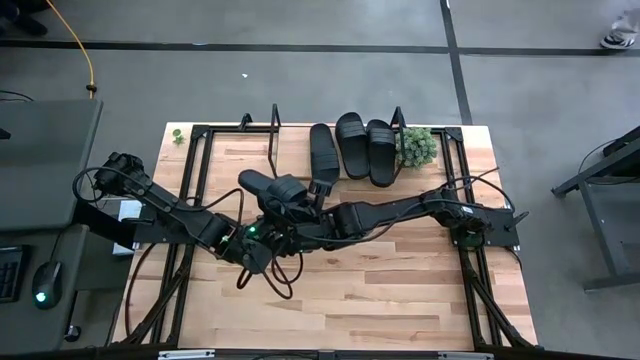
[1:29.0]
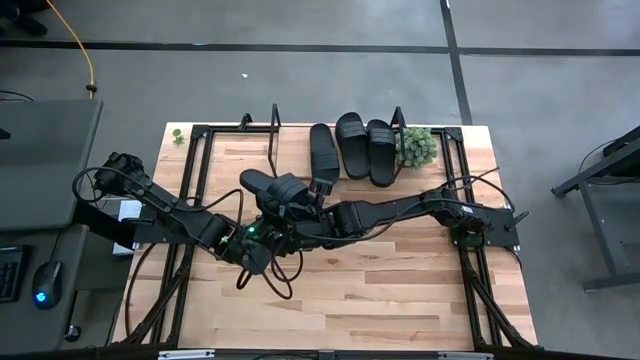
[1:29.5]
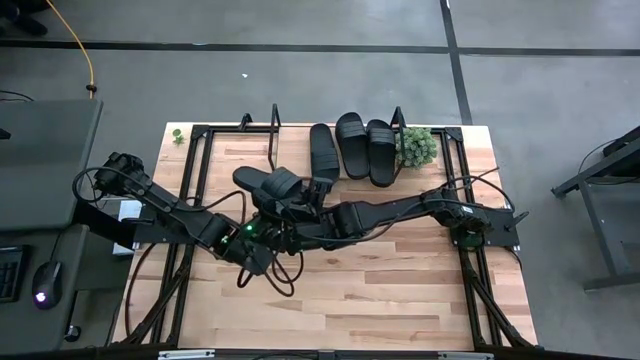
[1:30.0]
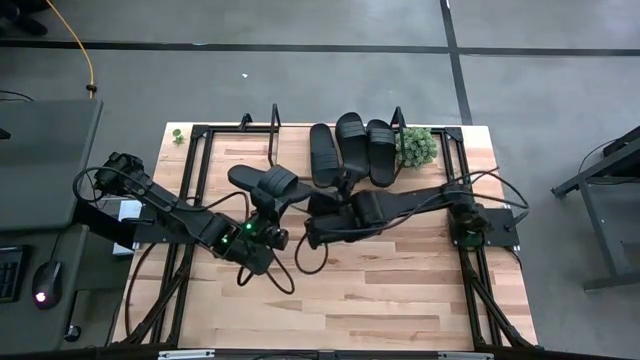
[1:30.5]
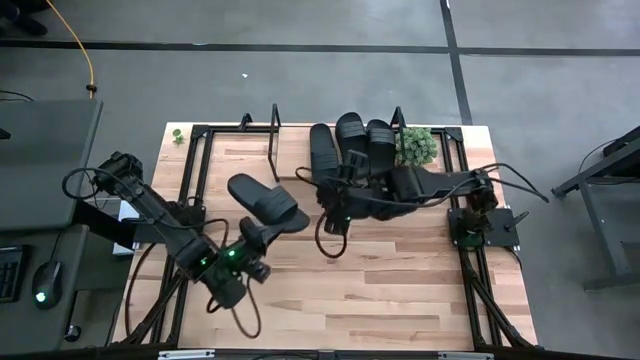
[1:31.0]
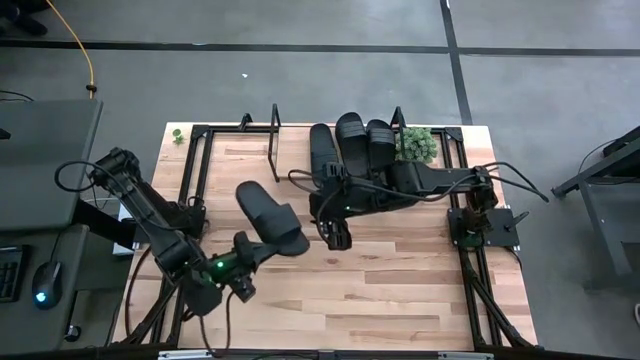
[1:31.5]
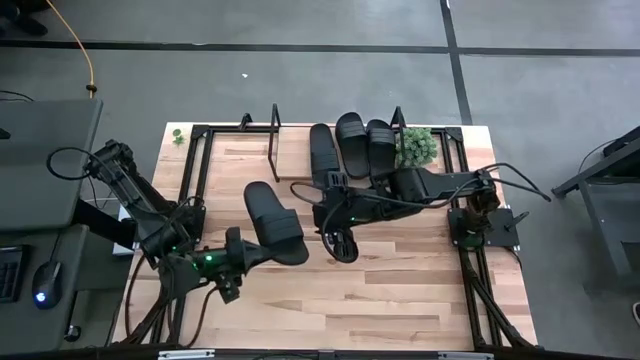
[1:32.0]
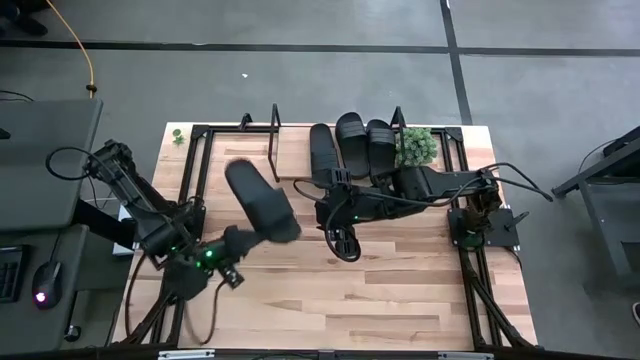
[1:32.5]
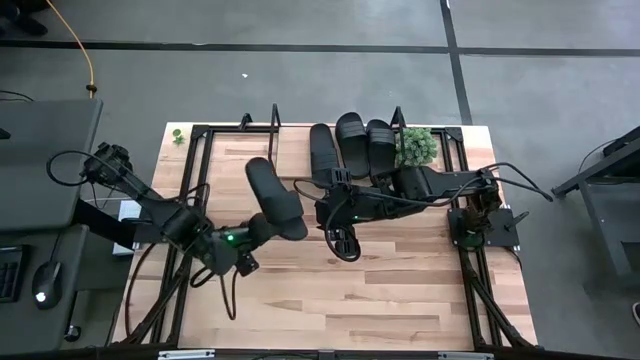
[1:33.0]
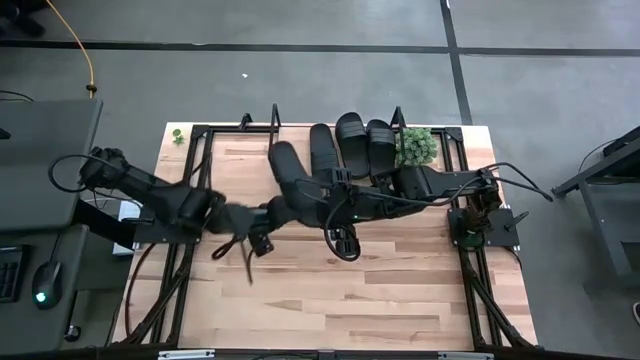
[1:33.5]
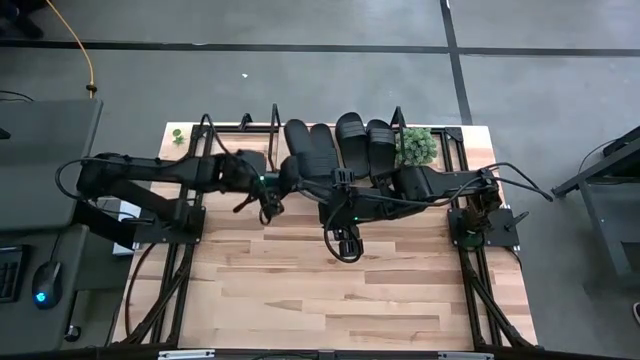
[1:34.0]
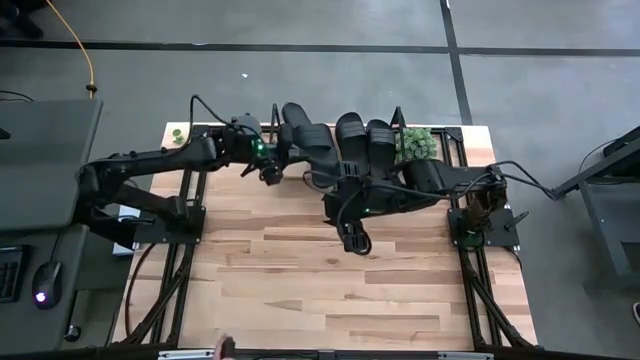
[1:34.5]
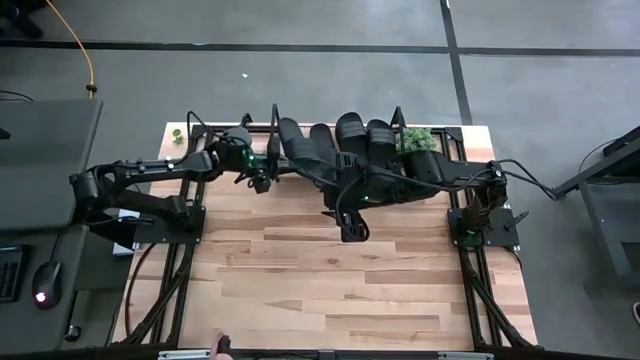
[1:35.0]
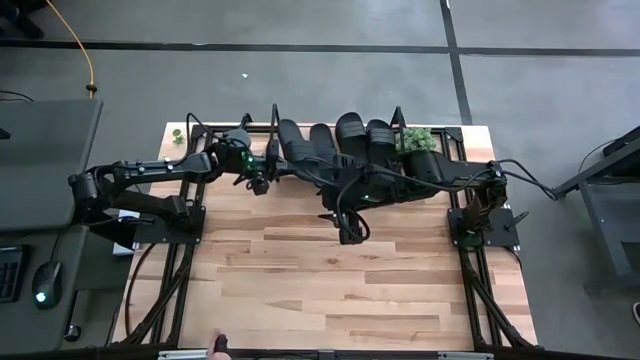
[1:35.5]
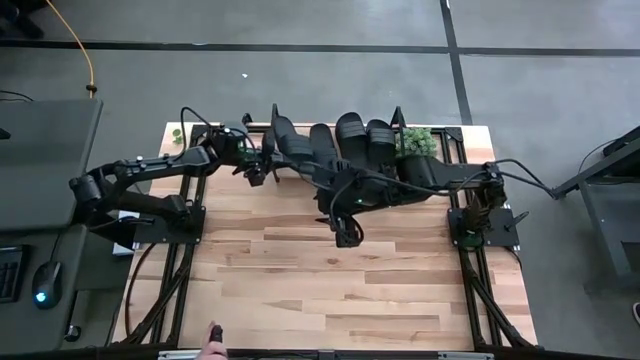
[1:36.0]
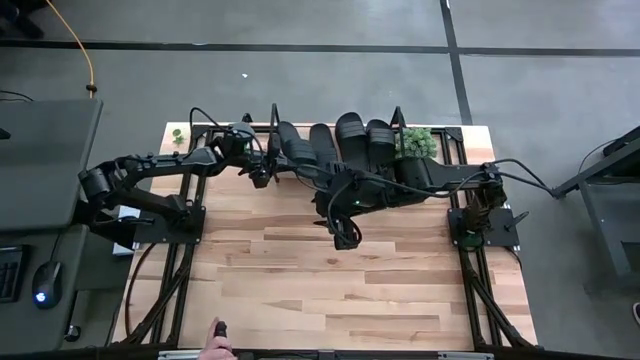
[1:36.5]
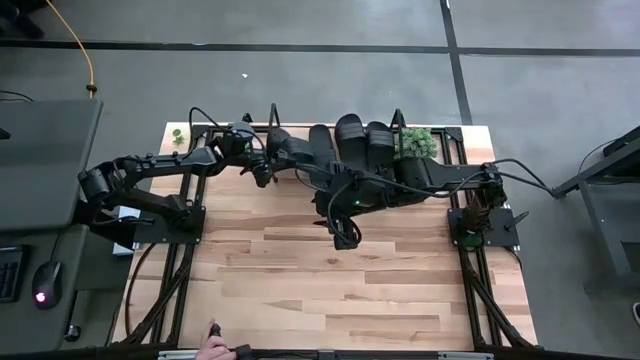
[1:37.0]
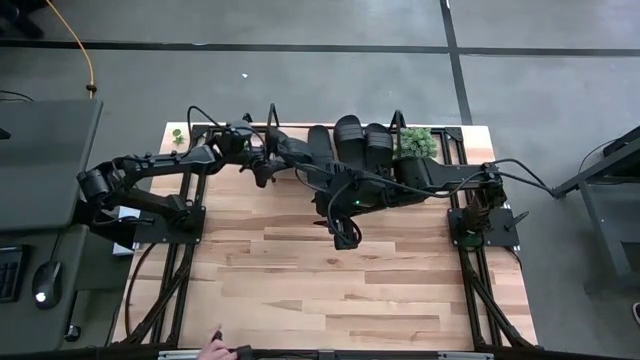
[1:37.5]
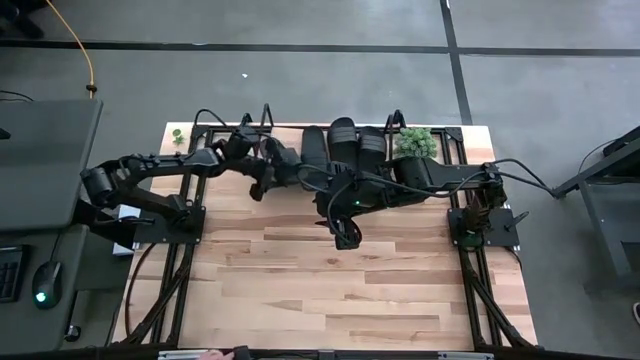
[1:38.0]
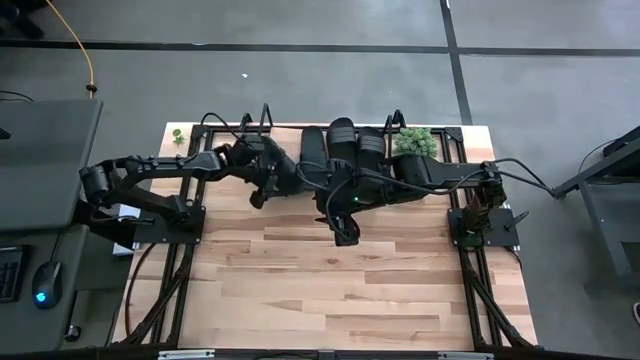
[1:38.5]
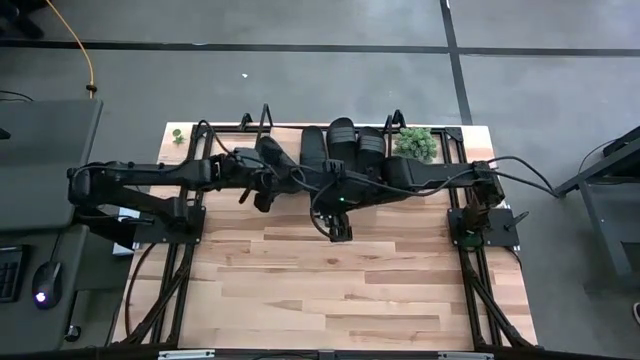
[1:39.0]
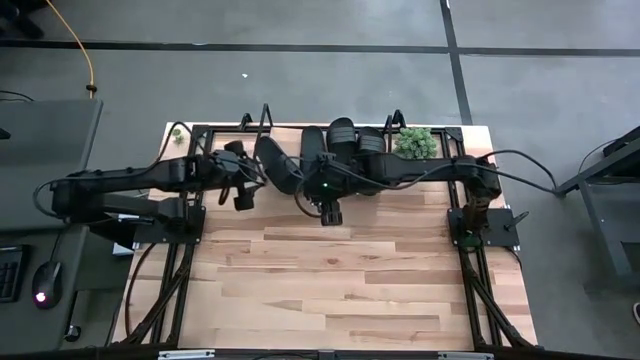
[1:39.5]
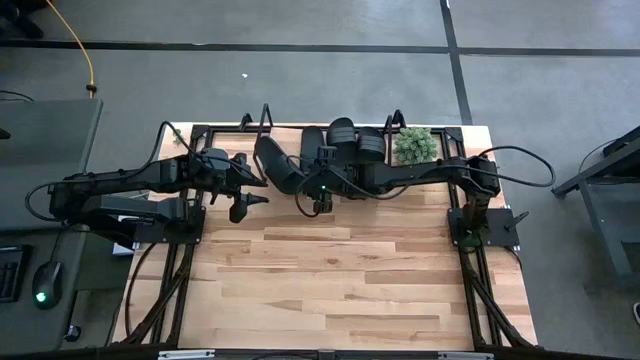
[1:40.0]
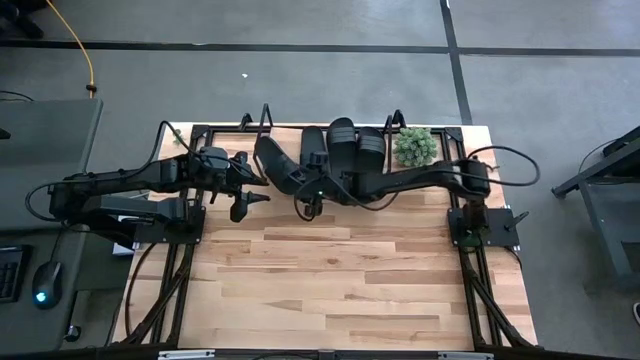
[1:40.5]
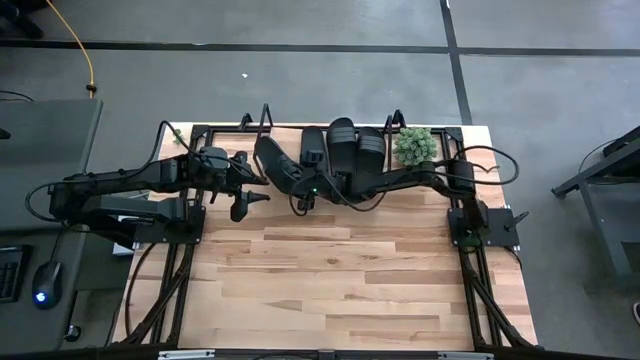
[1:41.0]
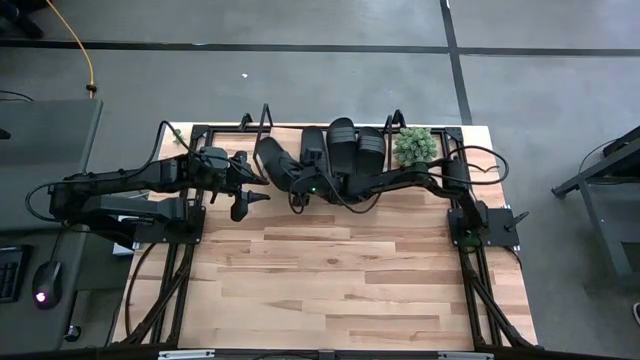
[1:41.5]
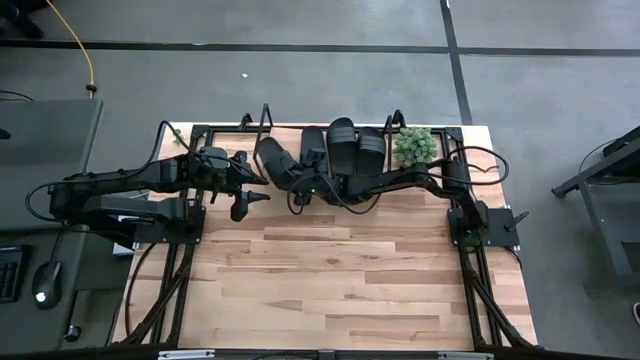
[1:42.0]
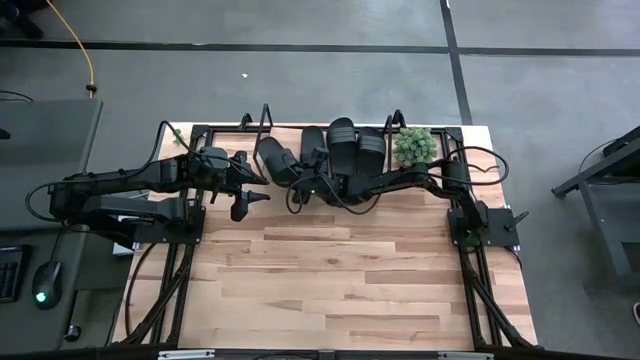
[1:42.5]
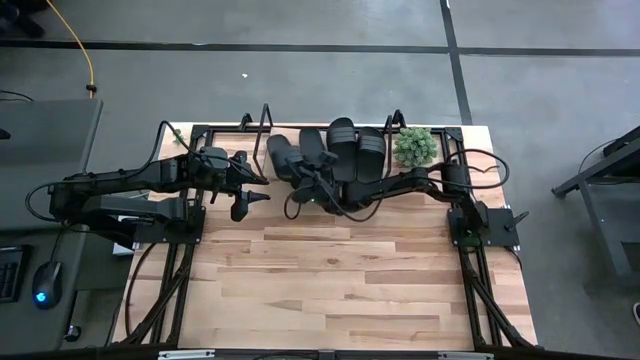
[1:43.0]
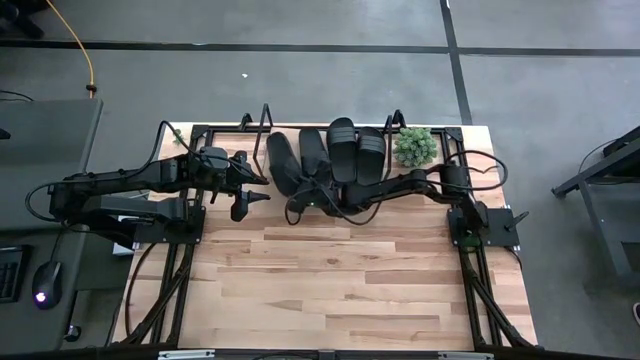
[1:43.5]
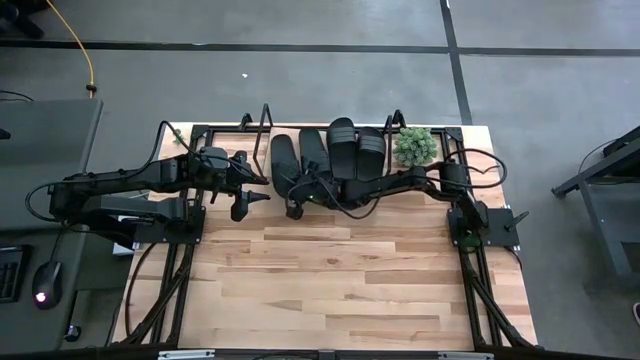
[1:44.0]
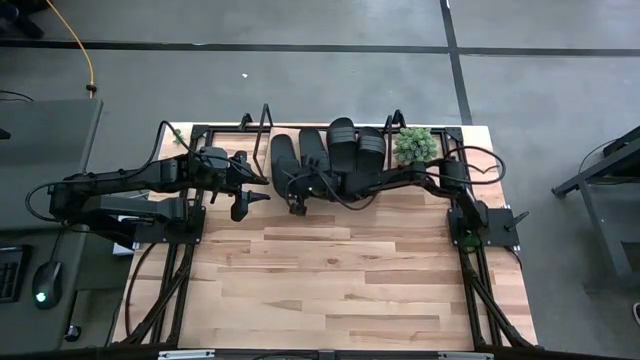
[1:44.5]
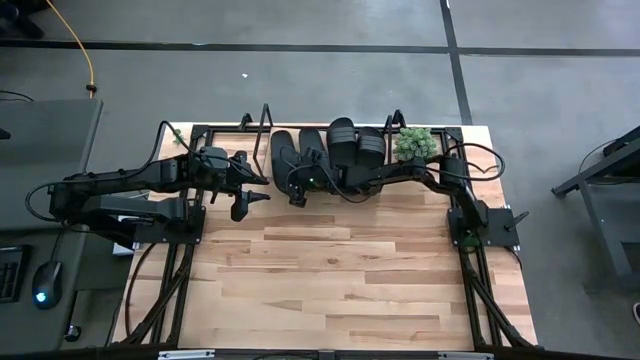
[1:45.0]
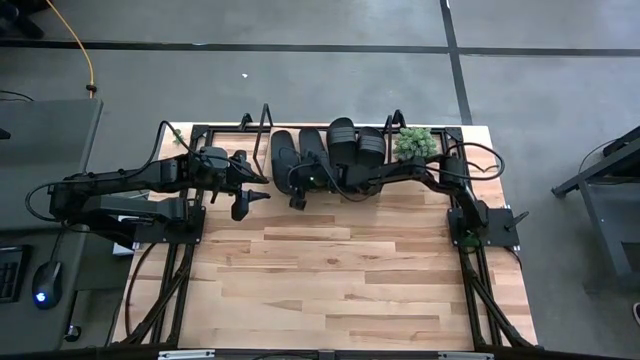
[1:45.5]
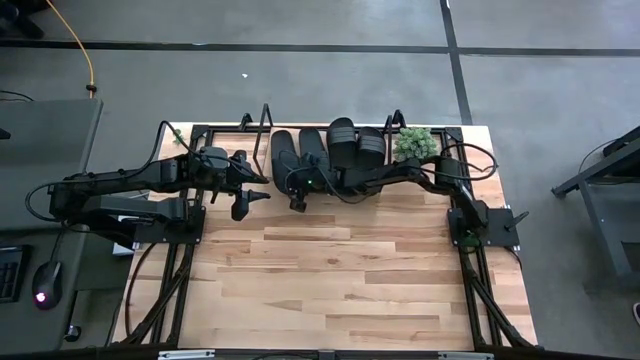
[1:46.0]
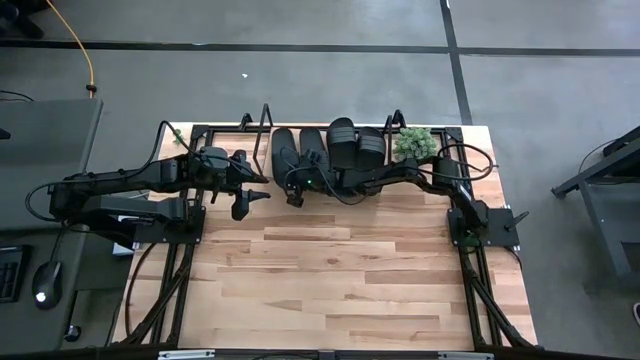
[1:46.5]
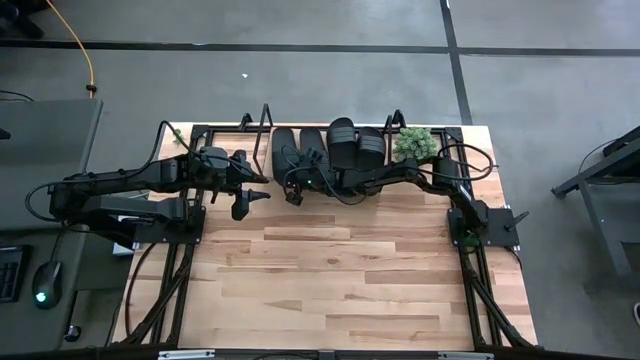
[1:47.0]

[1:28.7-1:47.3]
Task: Pick and place slides into the shelf
Put the black slipper on the shelf
